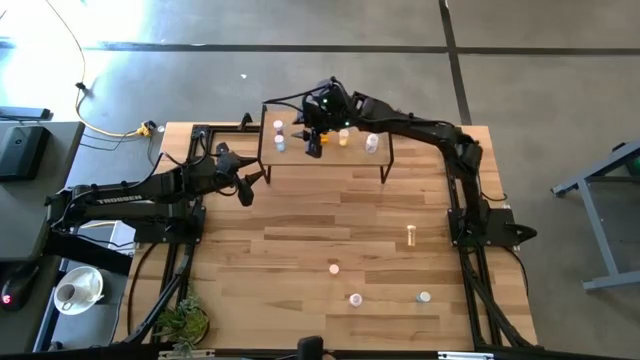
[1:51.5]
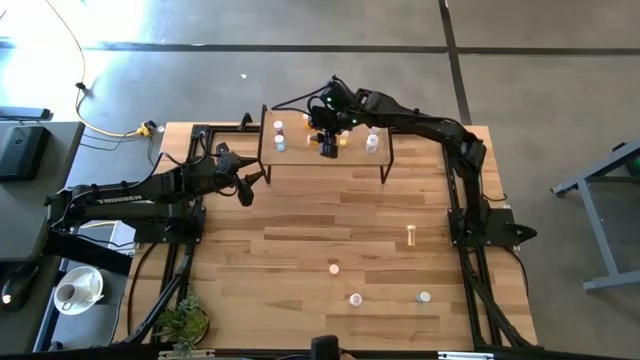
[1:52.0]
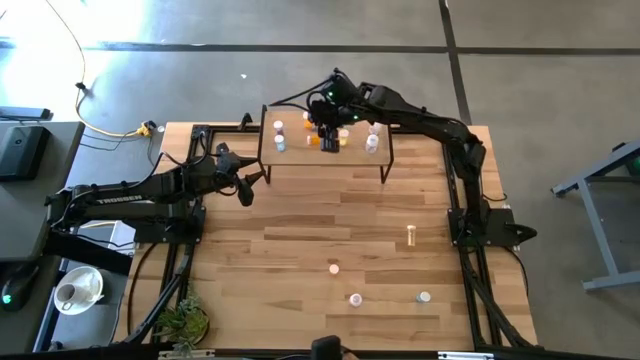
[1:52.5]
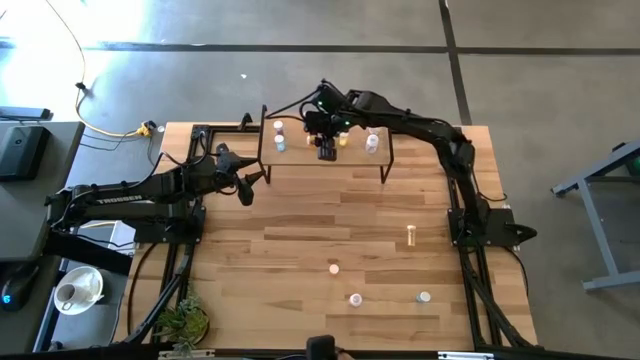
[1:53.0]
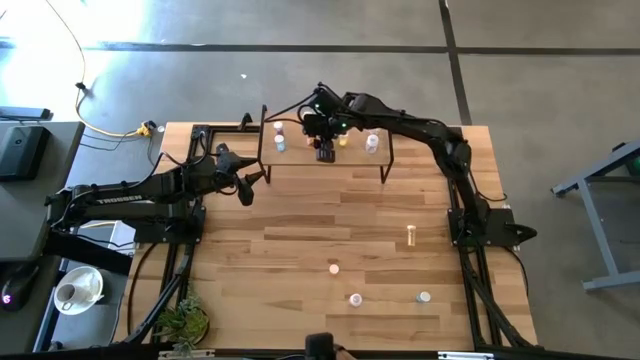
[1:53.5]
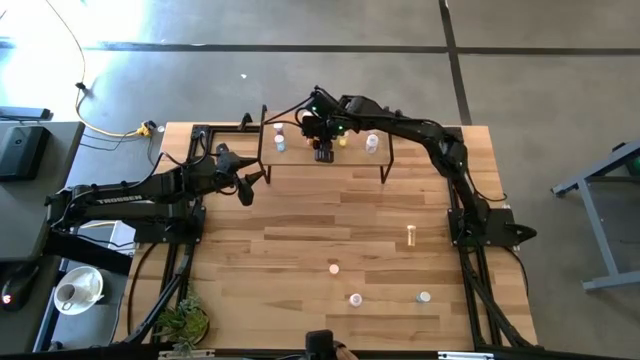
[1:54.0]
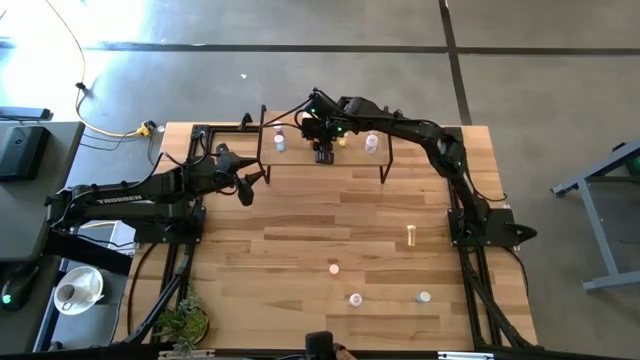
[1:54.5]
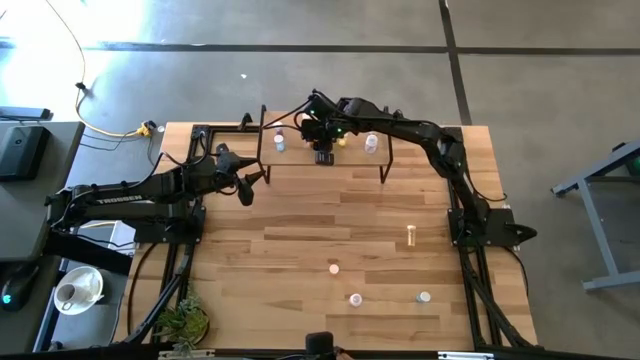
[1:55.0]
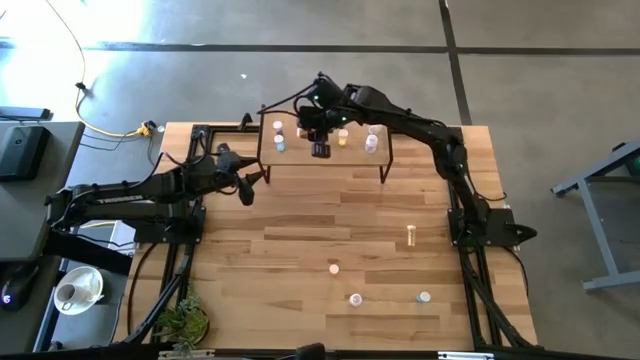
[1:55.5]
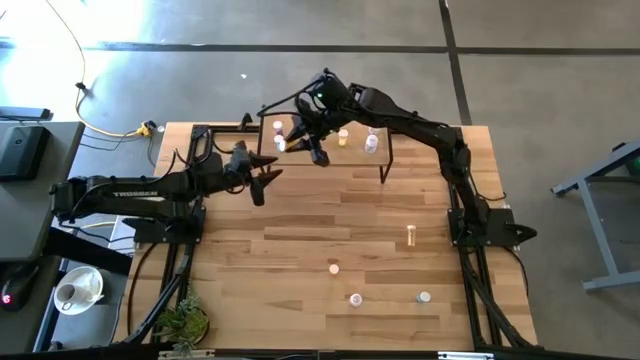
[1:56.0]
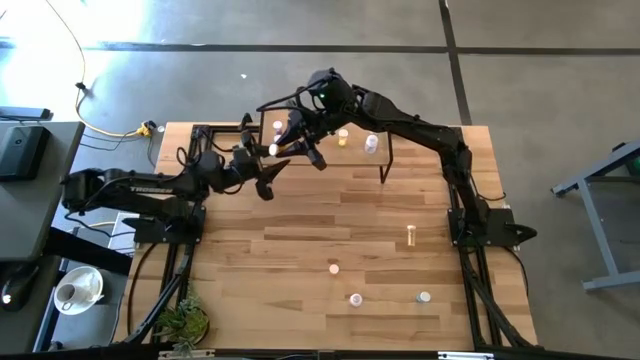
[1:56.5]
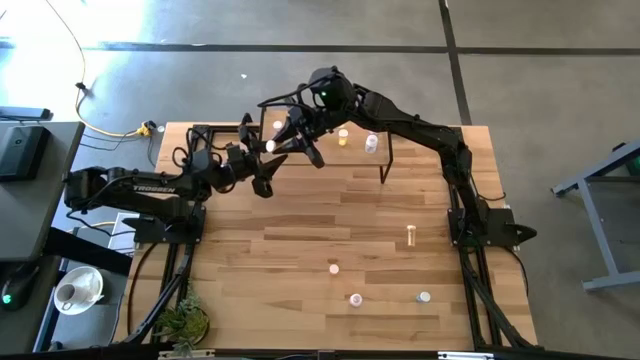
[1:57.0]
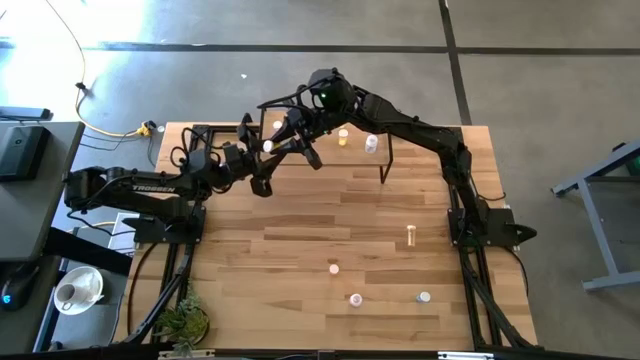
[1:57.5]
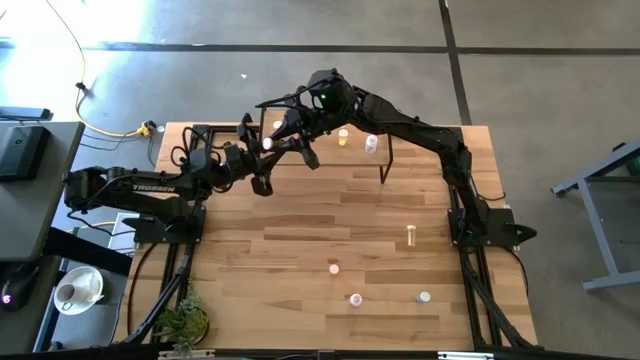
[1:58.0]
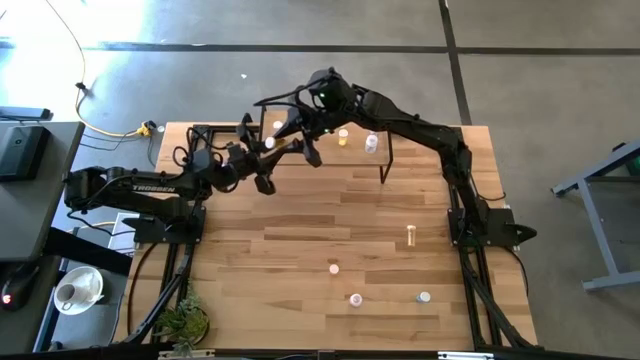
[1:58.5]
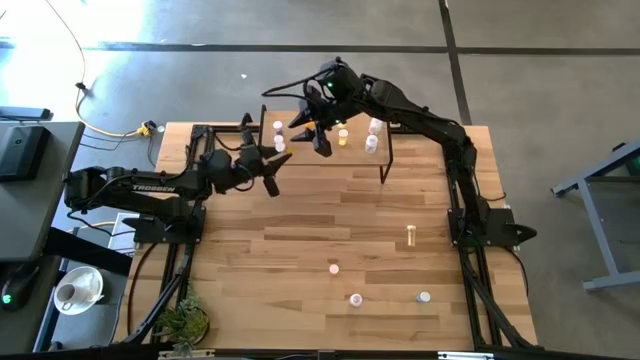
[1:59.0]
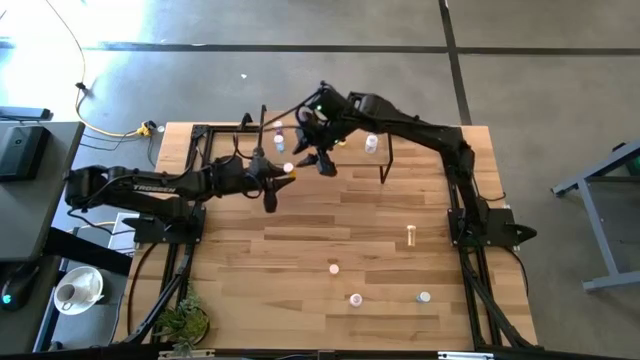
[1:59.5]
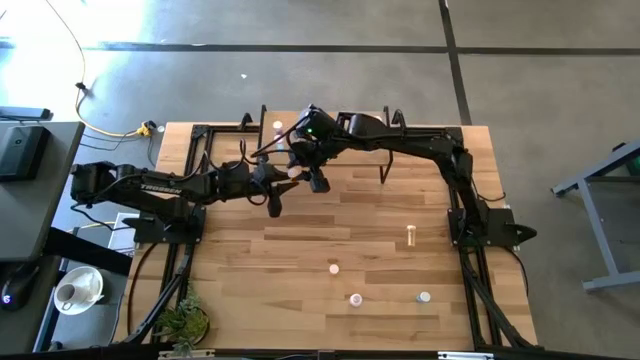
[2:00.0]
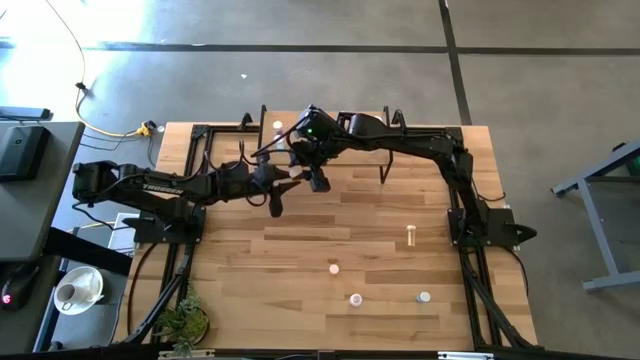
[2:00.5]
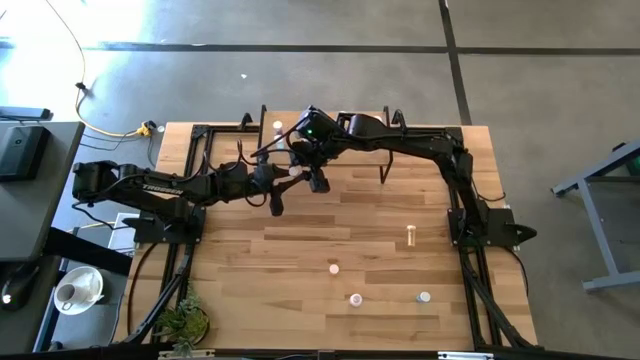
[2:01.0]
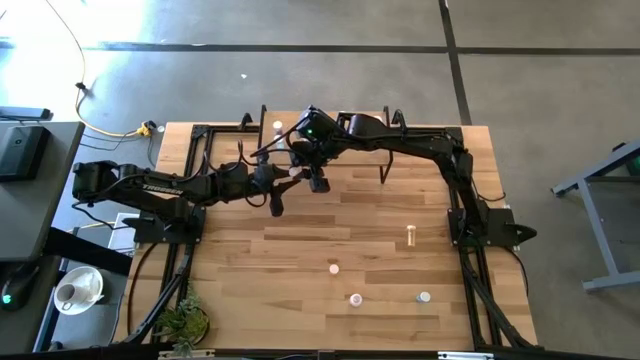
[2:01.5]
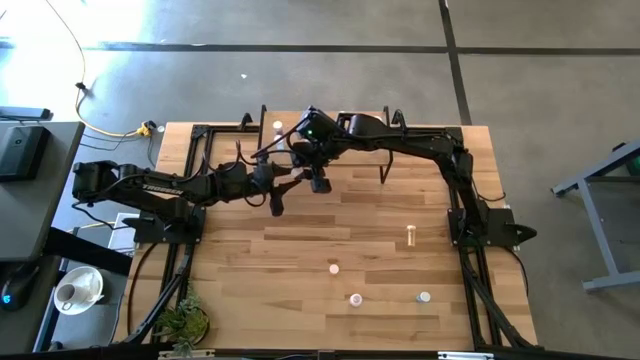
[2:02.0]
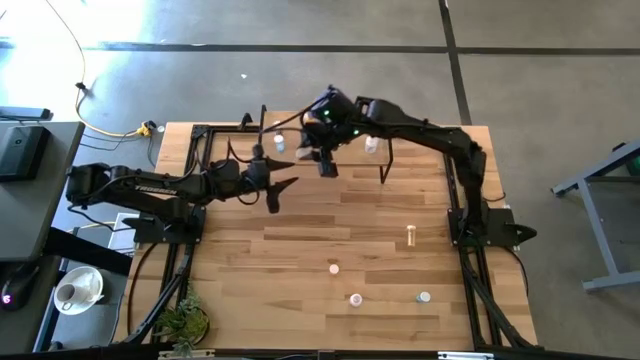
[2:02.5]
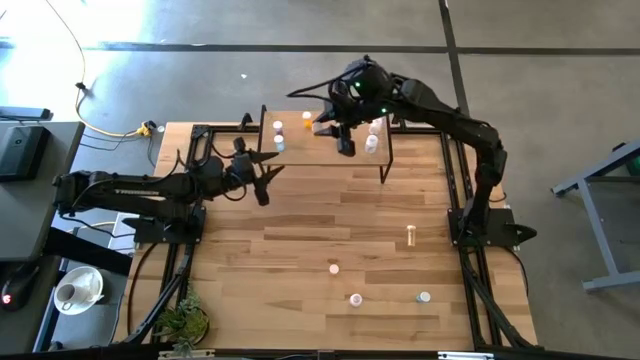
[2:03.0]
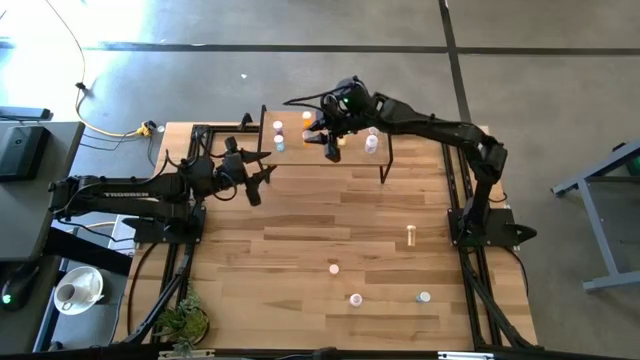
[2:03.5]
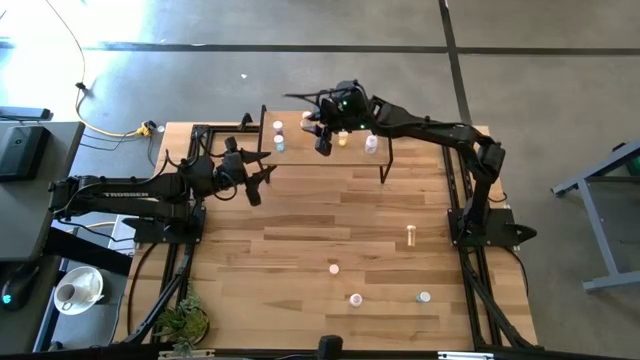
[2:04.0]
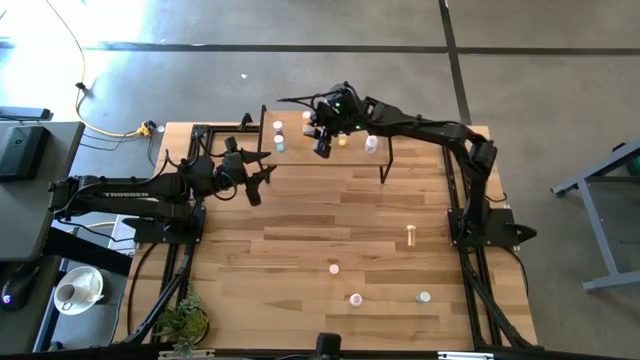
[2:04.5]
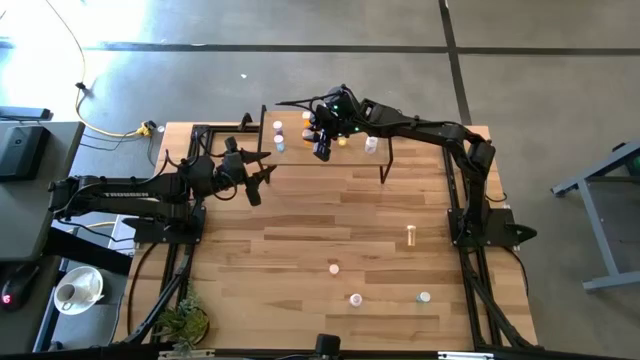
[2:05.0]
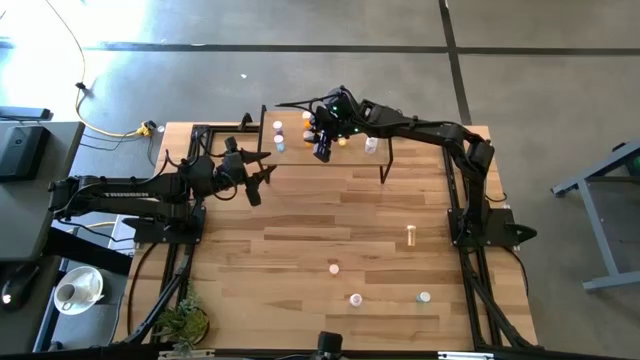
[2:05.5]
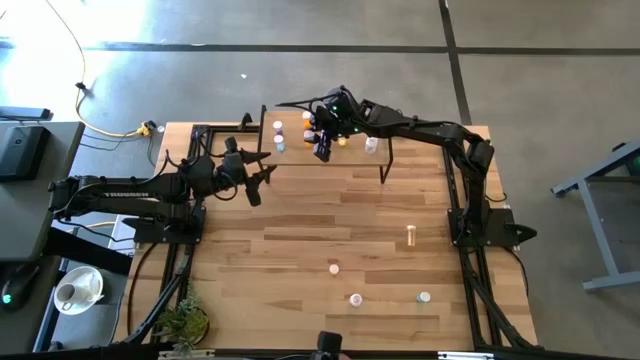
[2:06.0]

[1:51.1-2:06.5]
Task: Pick and place medicine bottles onto shelf by color
Adjust the orange pill bottle on the shelf

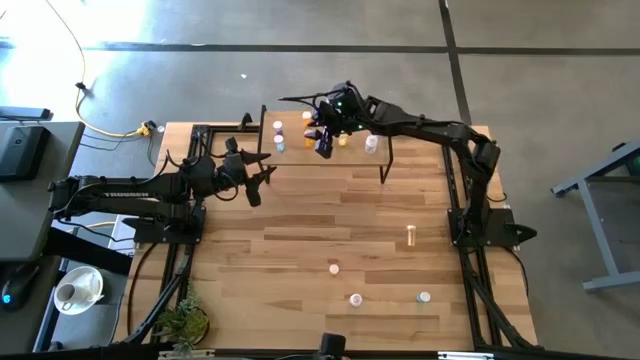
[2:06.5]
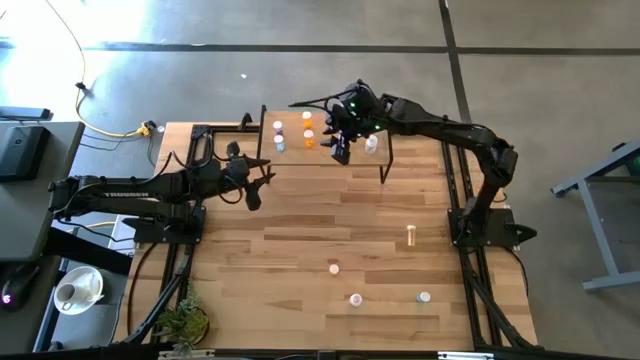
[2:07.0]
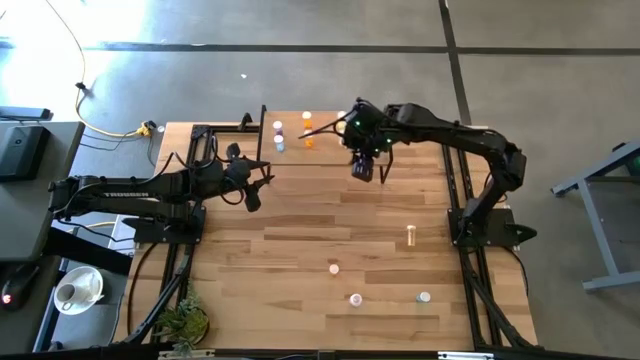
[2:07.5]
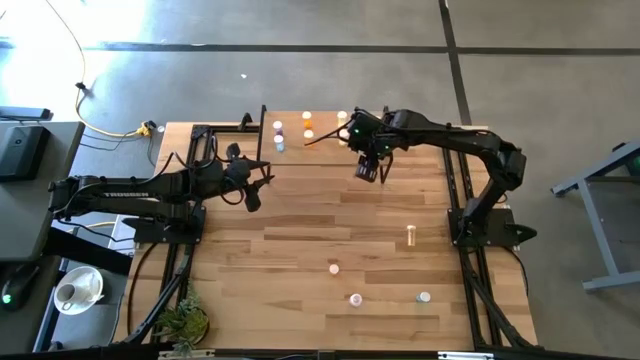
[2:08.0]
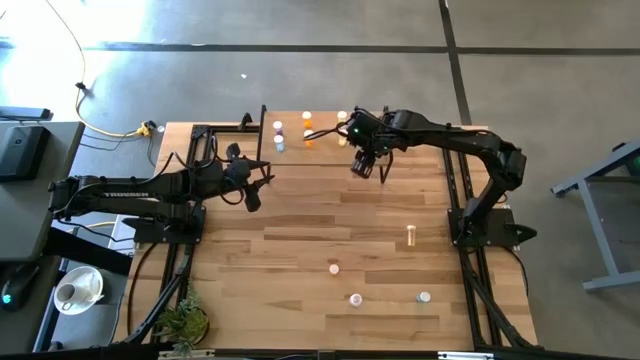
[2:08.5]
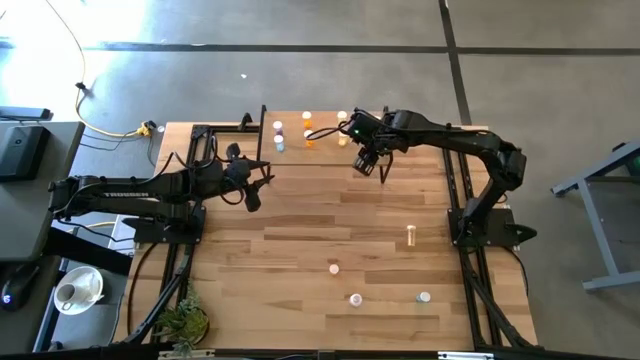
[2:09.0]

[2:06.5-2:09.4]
Adjust the white pill bottle on the shelf

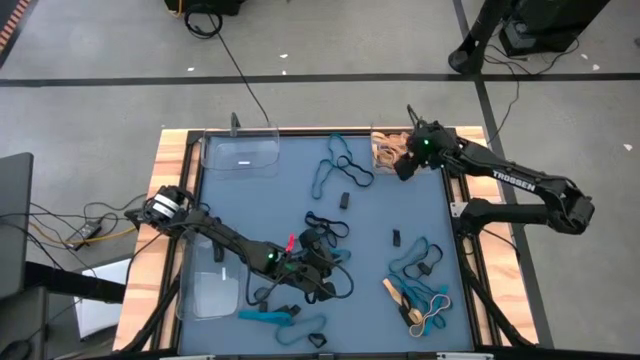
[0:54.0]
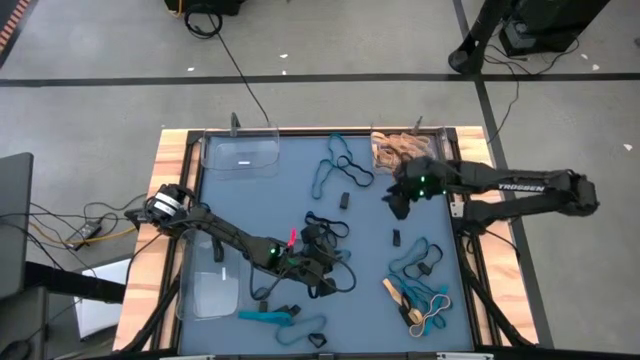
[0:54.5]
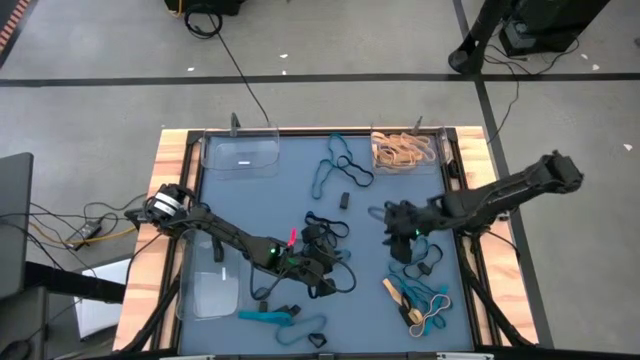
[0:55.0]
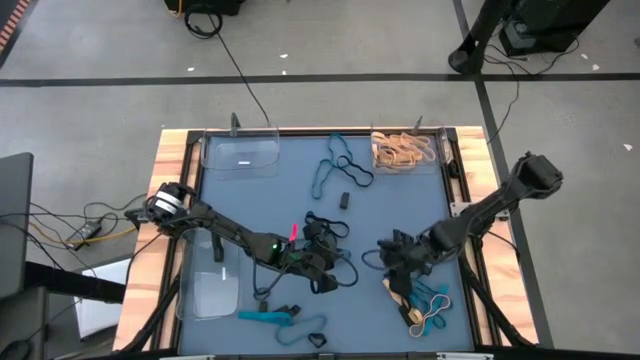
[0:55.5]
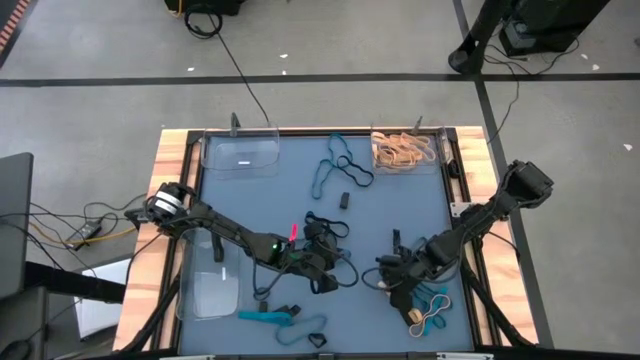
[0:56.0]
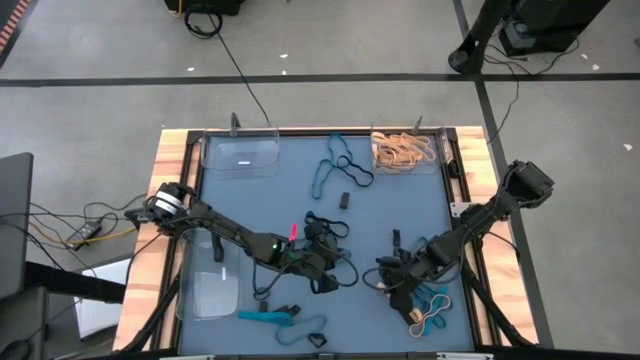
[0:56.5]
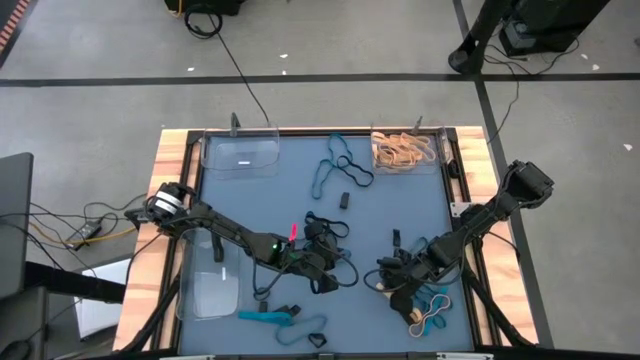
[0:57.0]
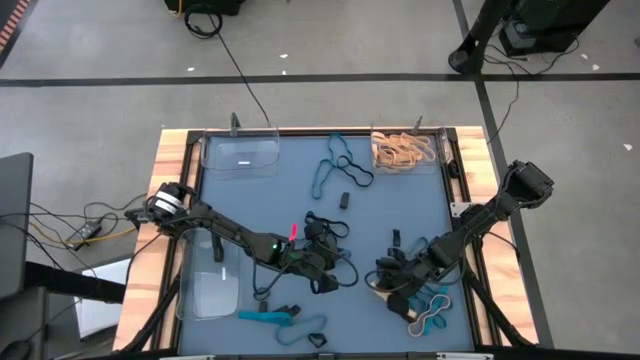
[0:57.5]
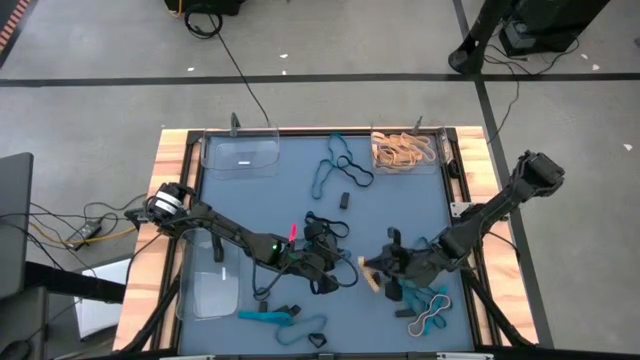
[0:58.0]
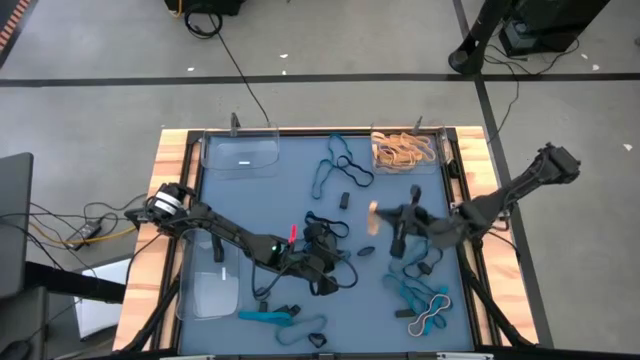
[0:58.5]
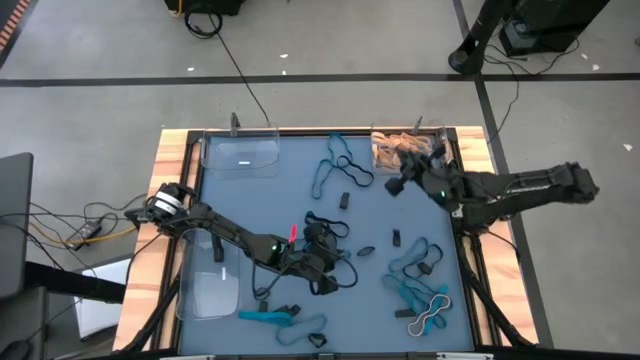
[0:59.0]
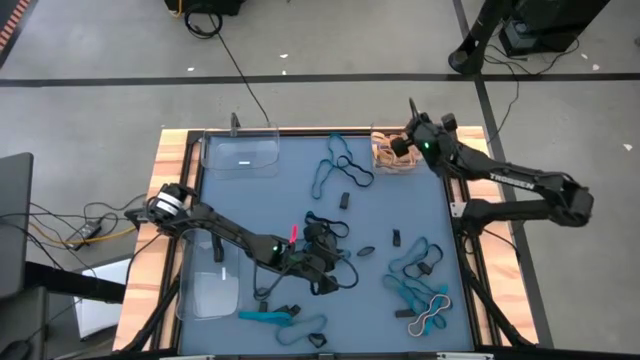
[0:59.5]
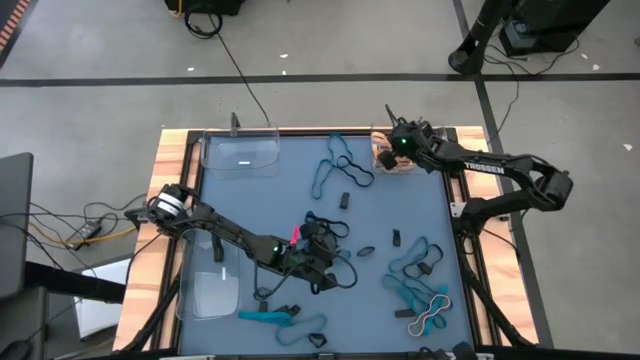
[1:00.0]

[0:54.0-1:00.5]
Task: Sort rubber bands into baskets
Put the yellow rubber band into the top right transparent bin
